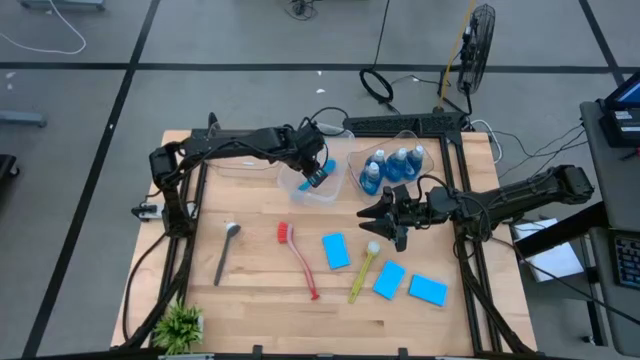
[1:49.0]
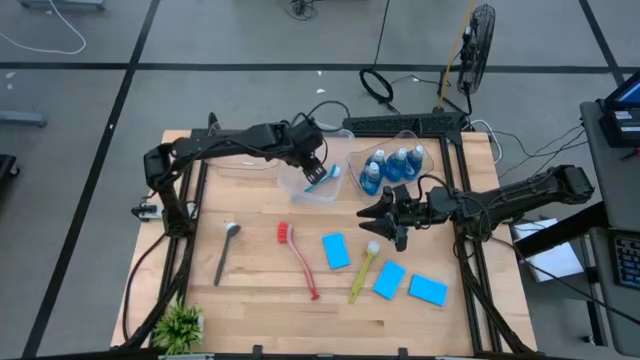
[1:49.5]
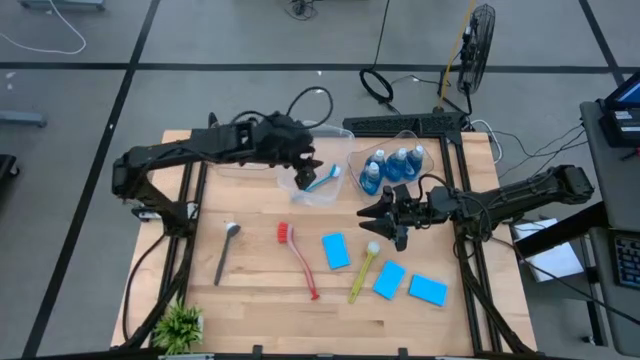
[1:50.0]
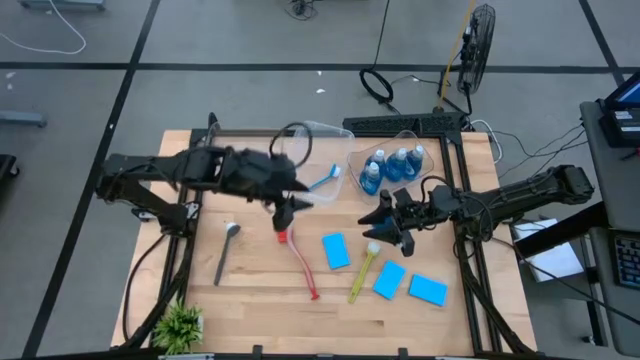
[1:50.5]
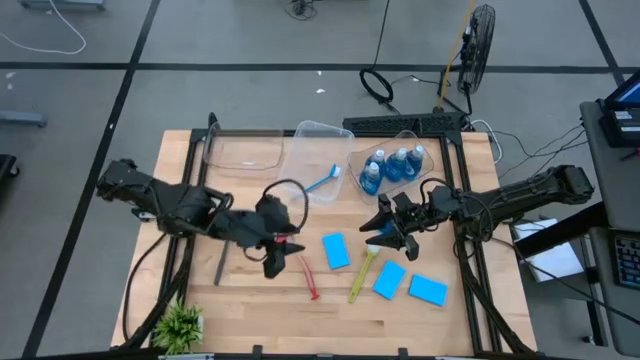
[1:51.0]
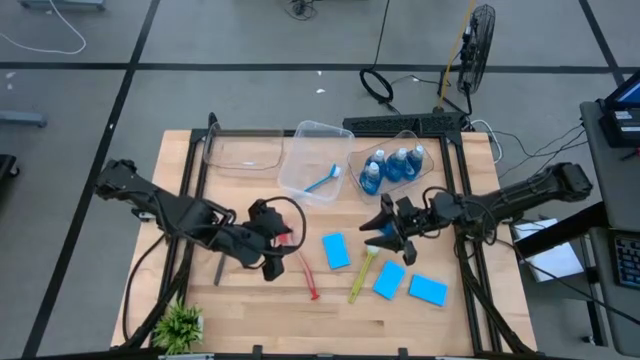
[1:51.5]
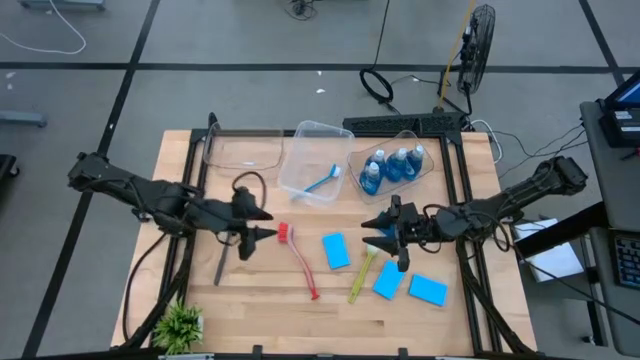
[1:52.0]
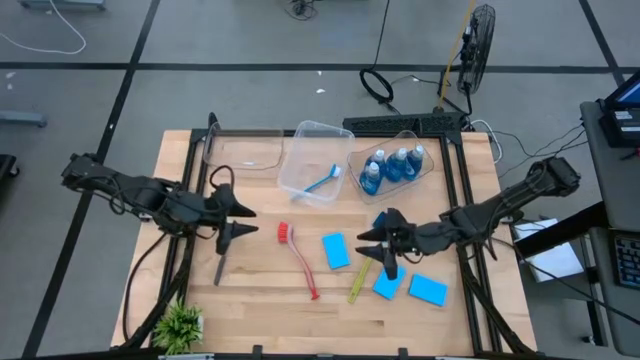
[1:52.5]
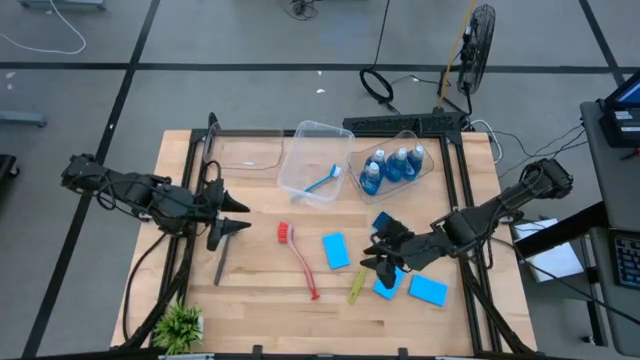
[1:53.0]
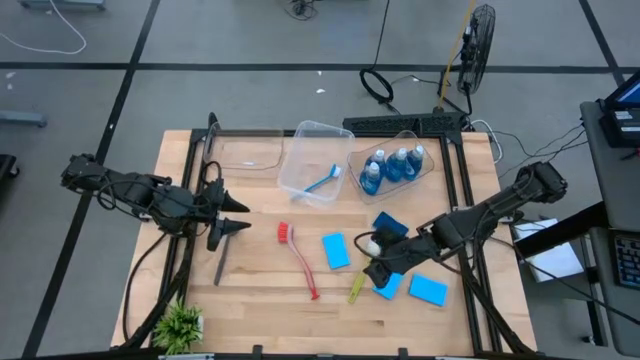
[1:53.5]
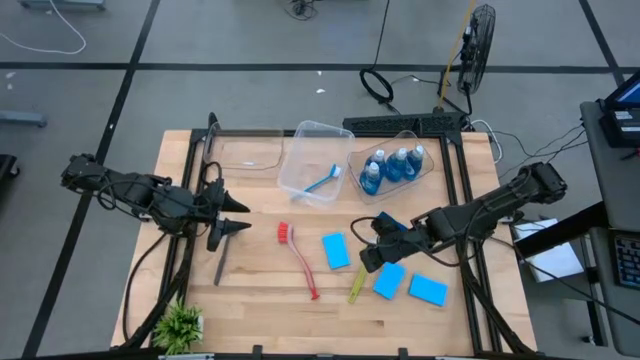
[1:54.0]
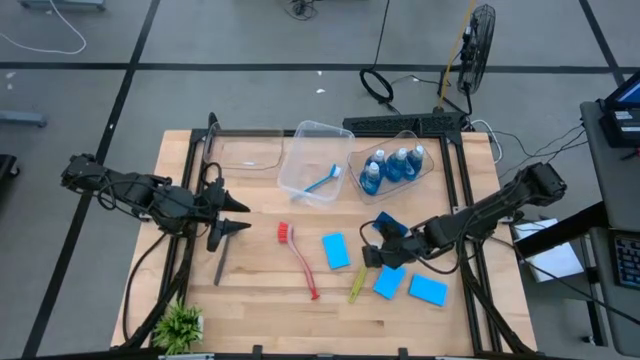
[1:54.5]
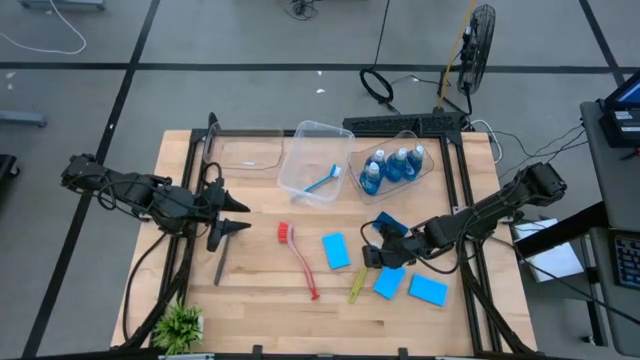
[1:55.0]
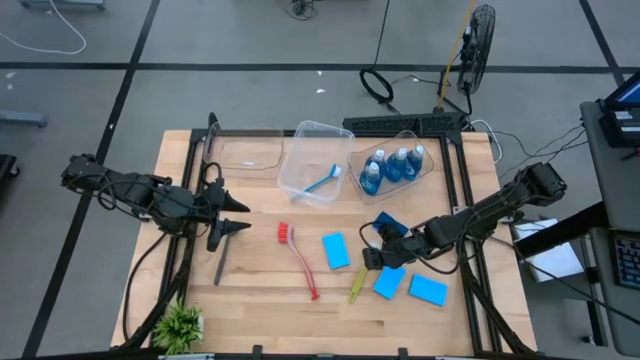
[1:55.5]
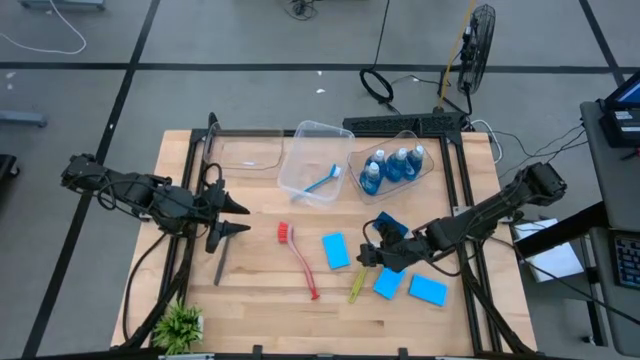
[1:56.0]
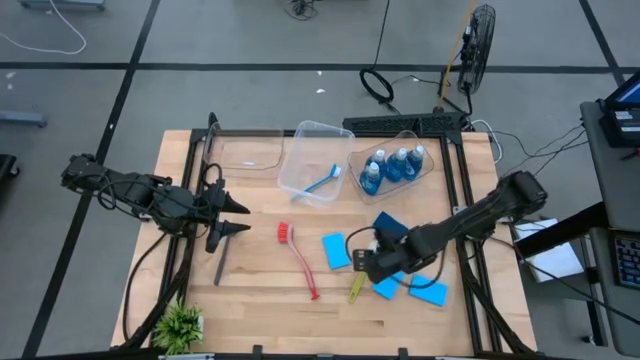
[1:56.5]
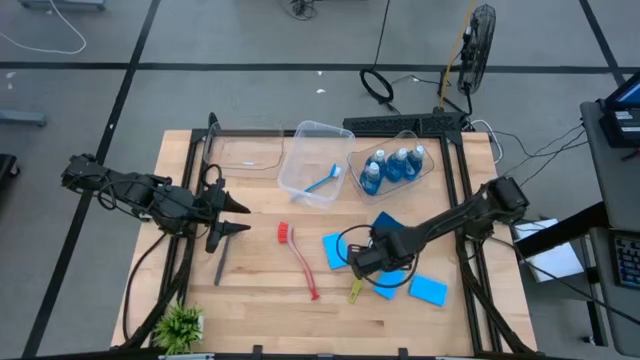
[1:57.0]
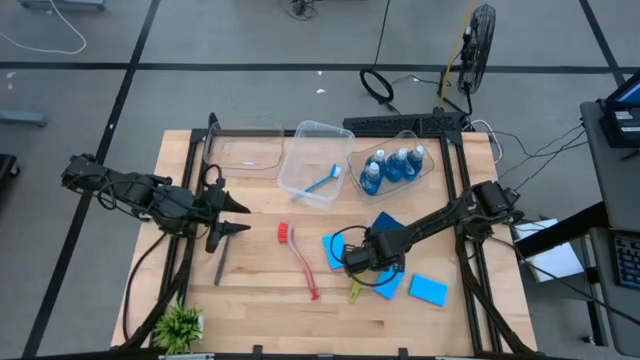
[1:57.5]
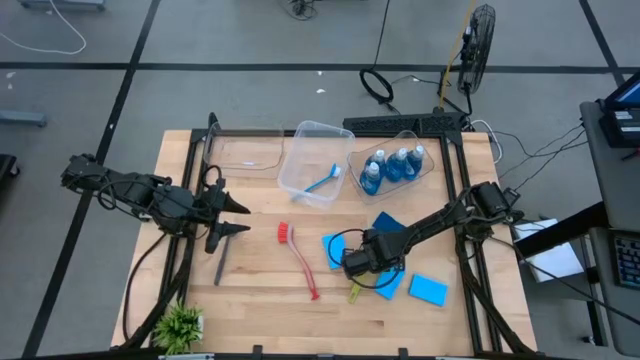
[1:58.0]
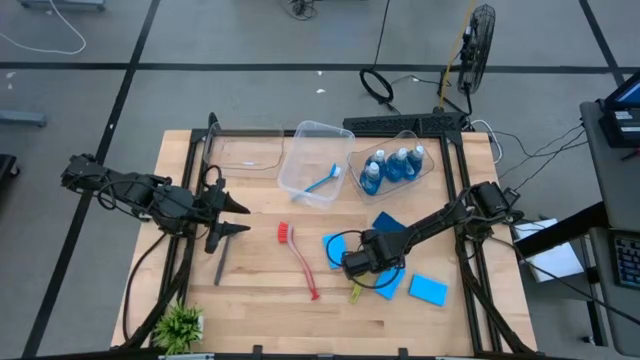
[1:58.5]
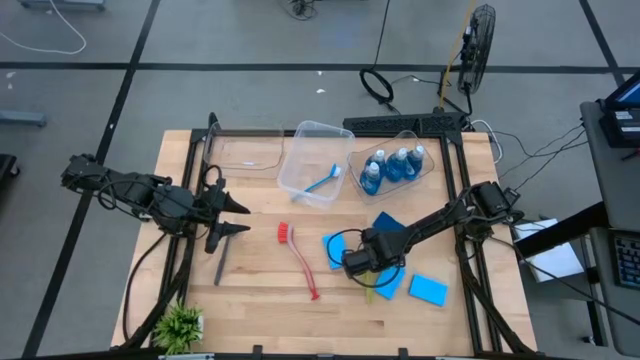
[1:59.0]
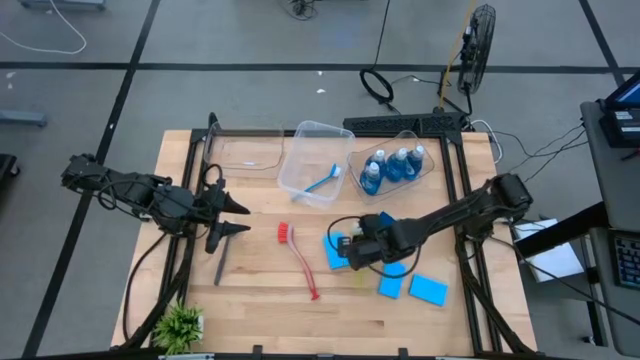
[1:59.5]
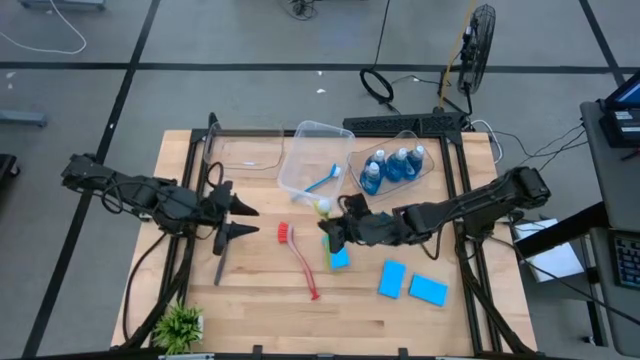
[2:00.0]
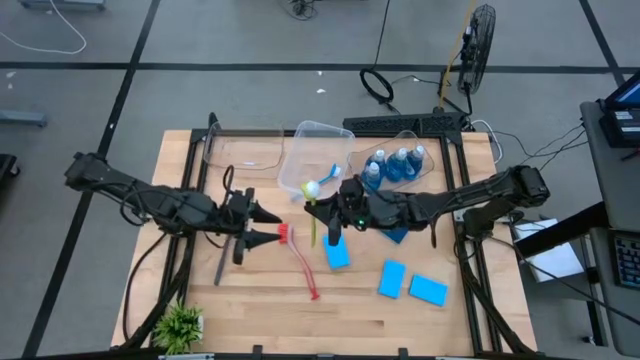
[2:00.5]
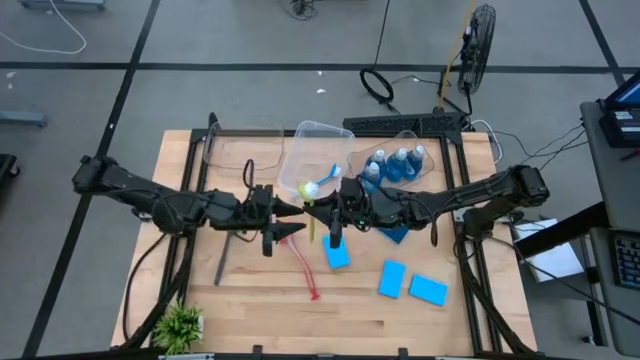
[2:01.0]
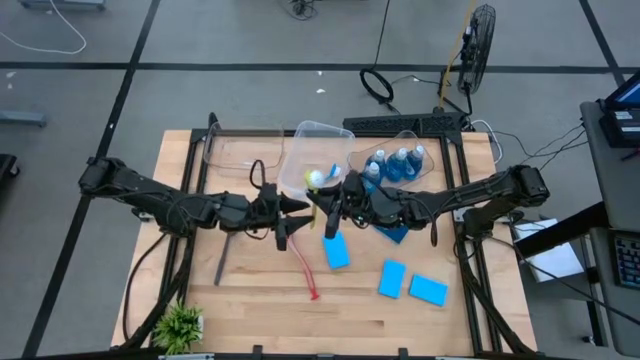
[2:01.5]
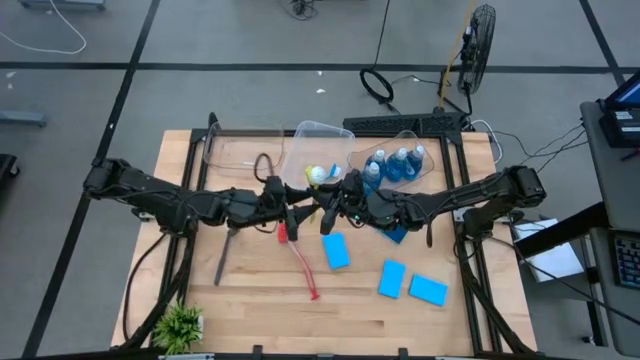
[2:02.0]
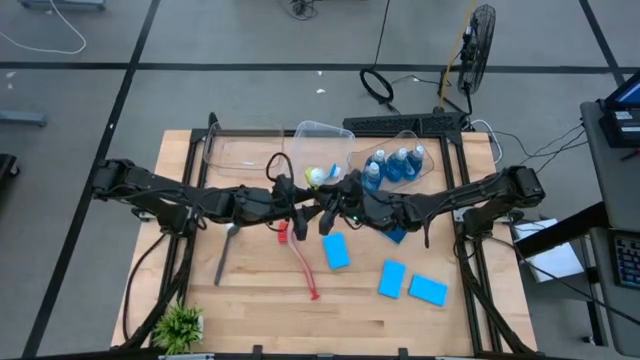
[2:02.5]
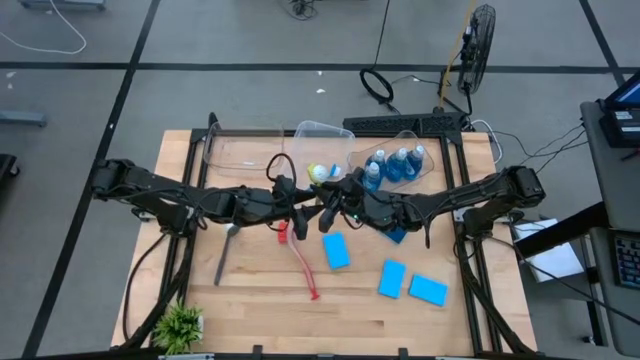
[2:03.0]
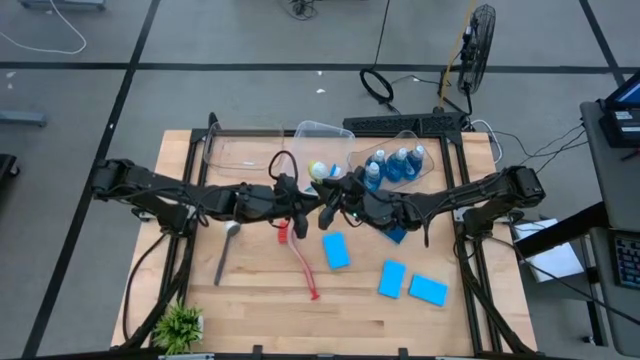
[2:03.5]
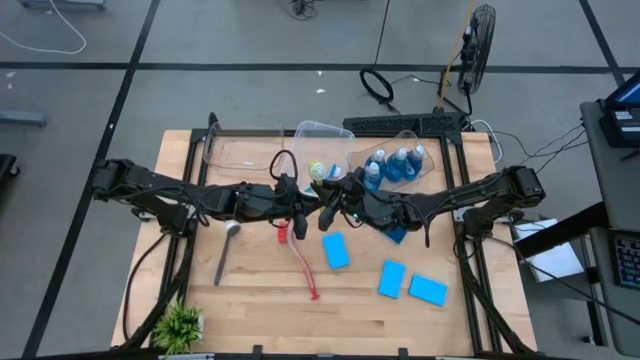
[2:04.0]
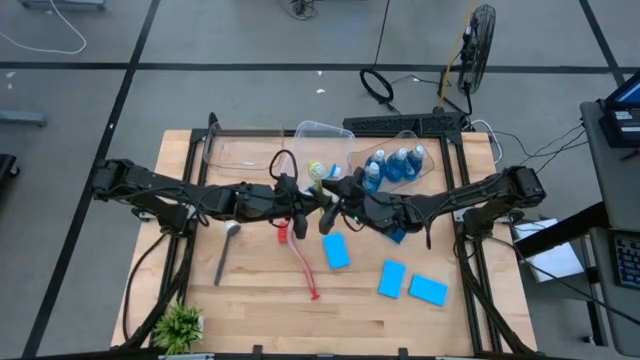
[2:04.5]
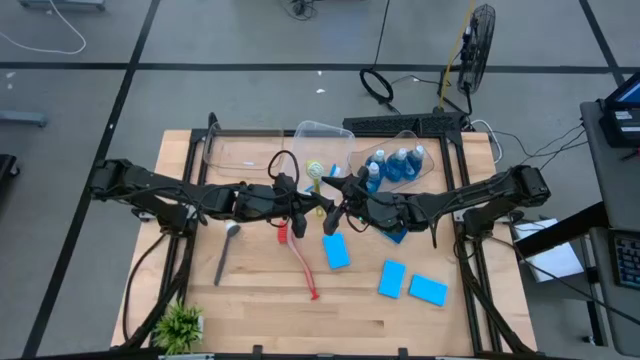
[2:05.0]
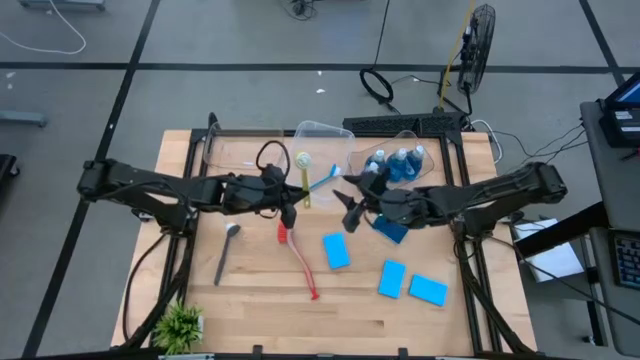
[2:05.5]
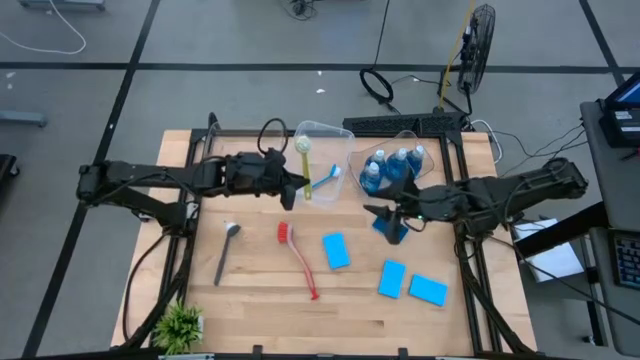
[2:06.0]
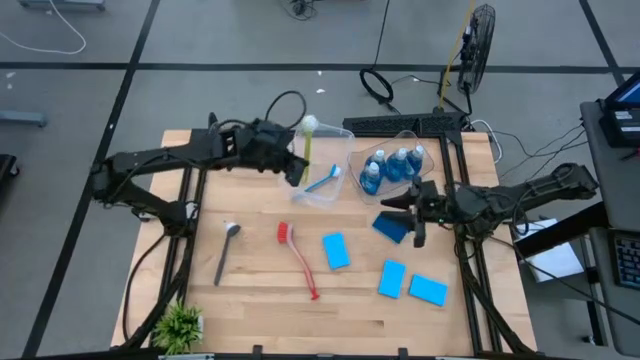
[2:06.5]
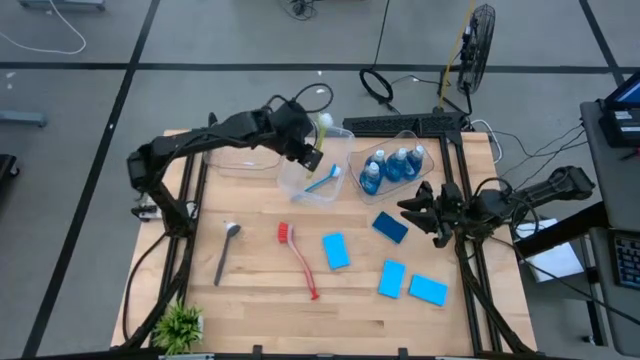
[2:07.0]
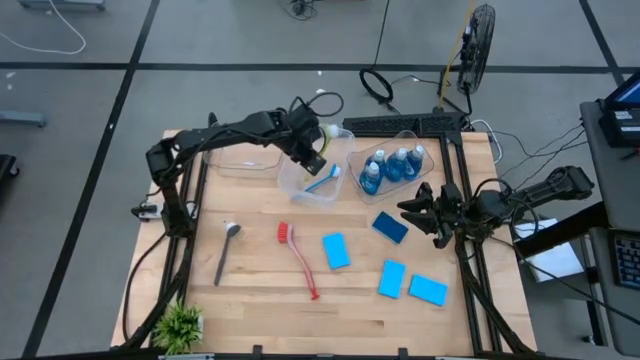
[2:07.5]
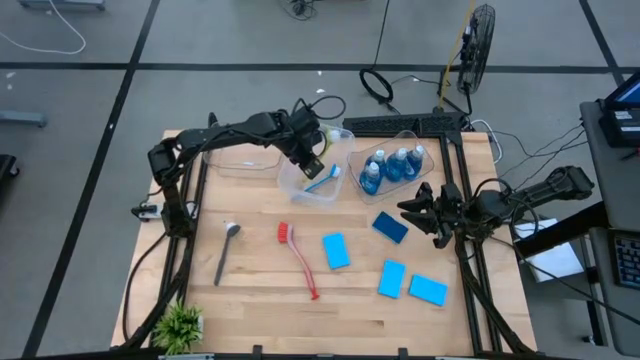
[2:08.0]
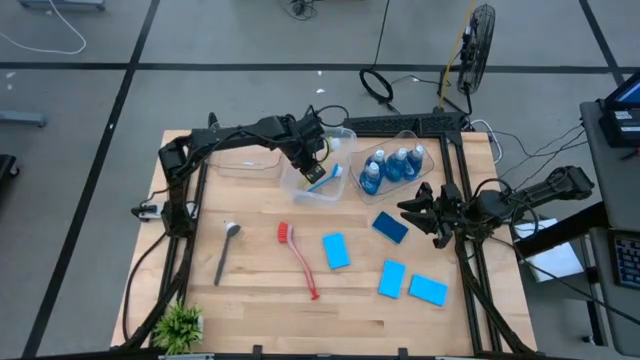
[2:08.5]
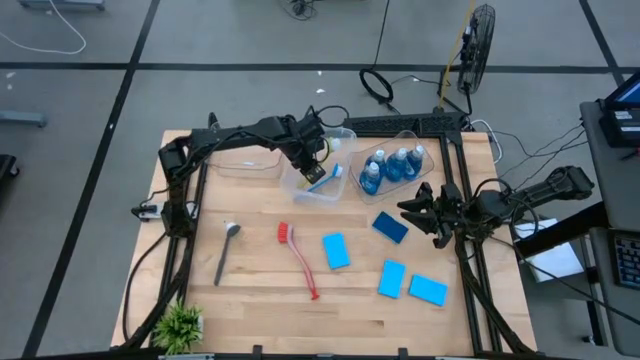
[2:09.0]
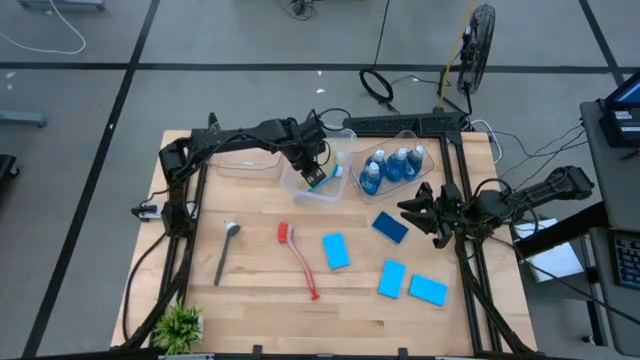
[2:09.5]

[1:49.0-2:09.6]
Task: Pick & Place Kitchen Sink Supplies
Put the green dish brush into the transparent container
